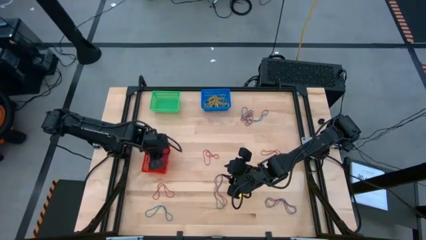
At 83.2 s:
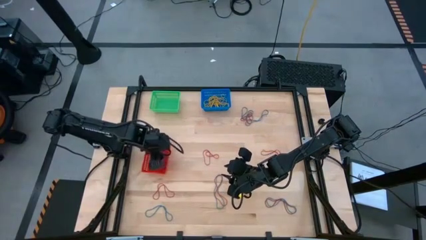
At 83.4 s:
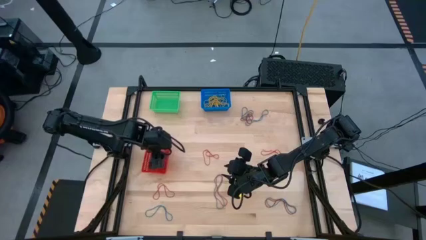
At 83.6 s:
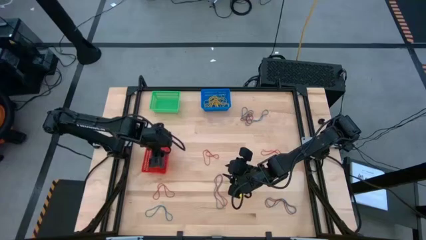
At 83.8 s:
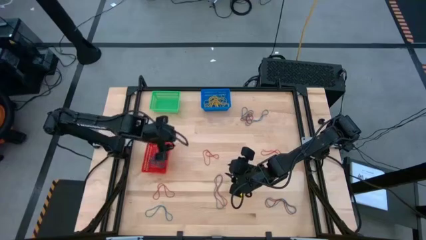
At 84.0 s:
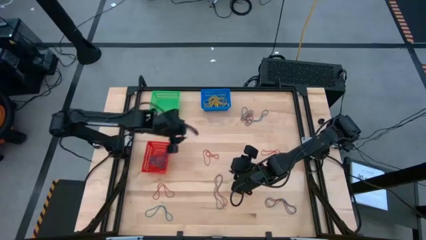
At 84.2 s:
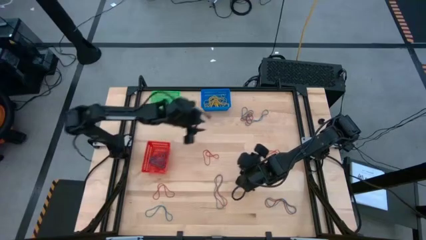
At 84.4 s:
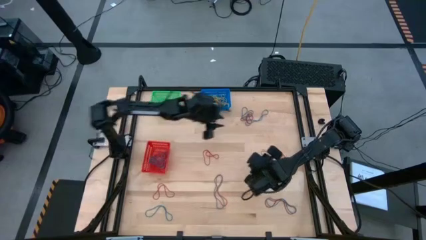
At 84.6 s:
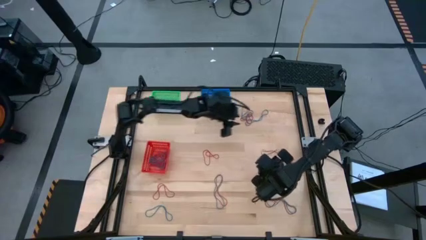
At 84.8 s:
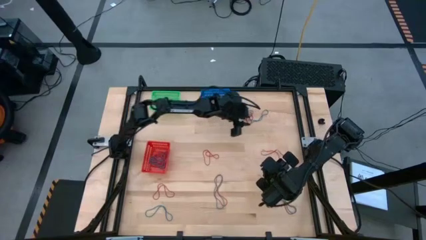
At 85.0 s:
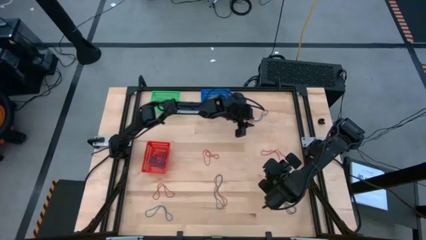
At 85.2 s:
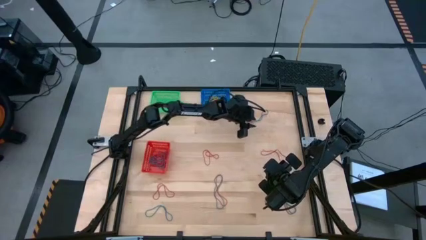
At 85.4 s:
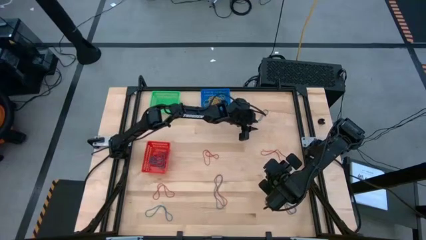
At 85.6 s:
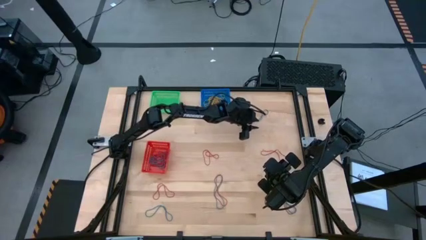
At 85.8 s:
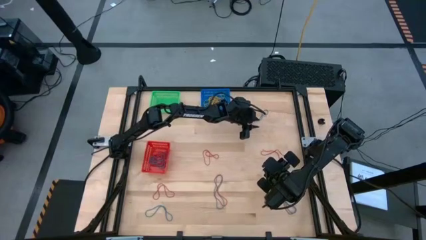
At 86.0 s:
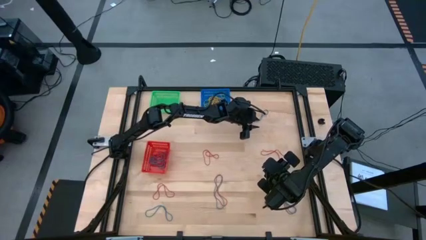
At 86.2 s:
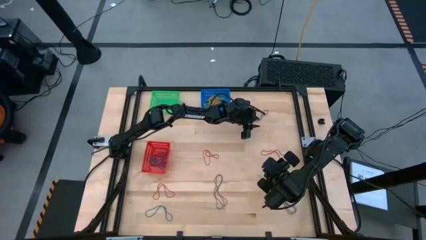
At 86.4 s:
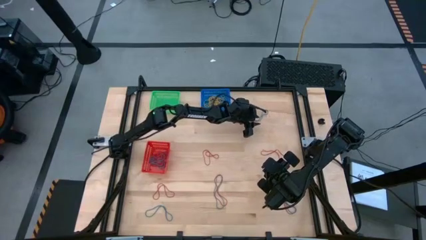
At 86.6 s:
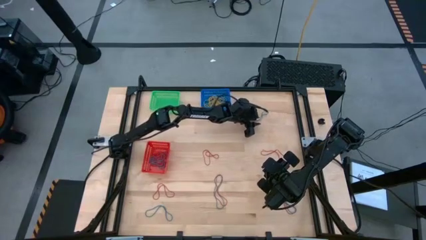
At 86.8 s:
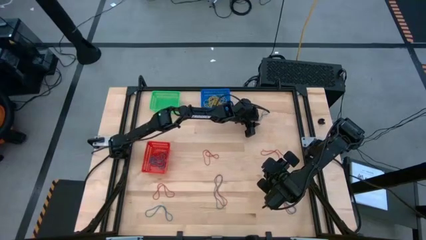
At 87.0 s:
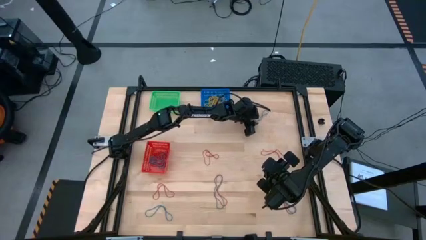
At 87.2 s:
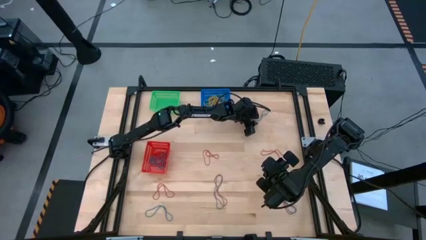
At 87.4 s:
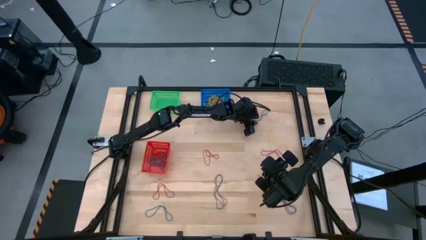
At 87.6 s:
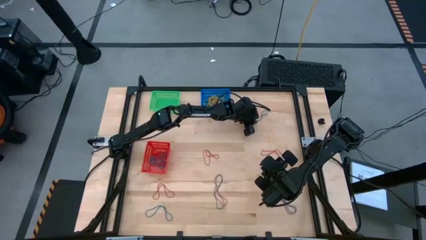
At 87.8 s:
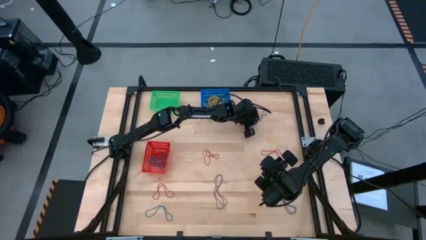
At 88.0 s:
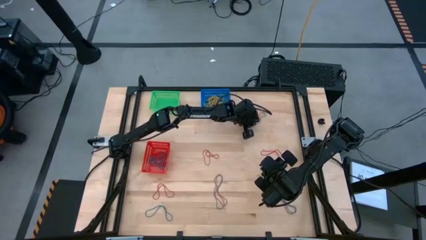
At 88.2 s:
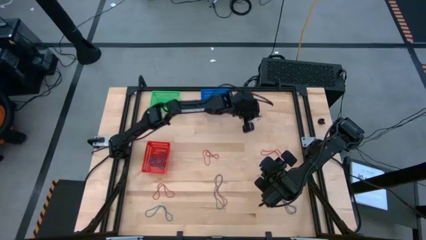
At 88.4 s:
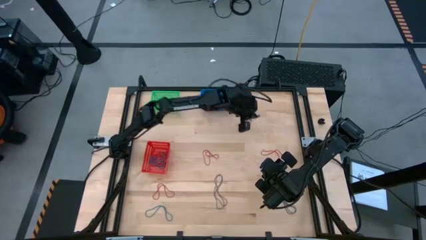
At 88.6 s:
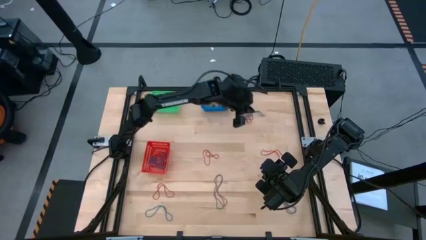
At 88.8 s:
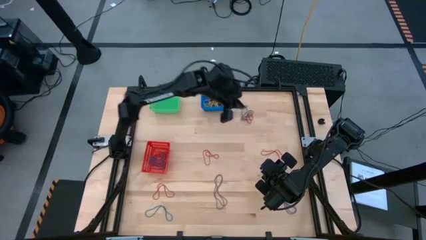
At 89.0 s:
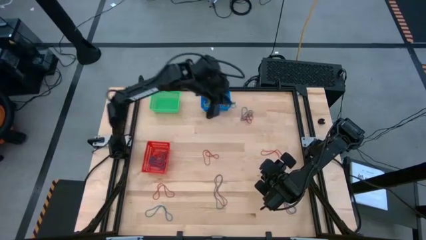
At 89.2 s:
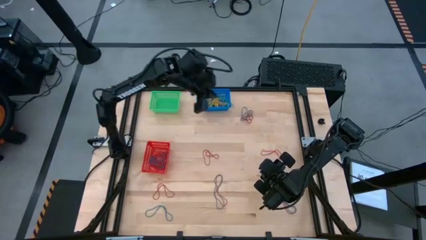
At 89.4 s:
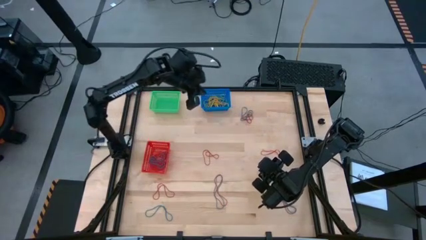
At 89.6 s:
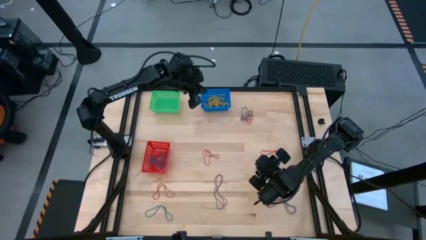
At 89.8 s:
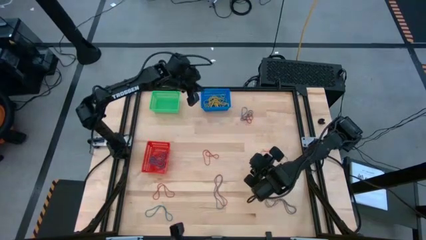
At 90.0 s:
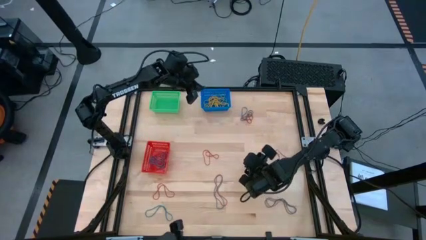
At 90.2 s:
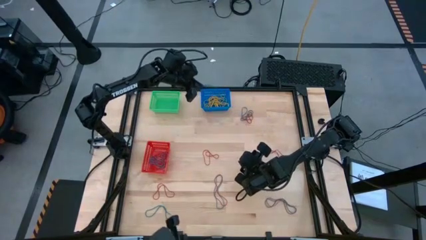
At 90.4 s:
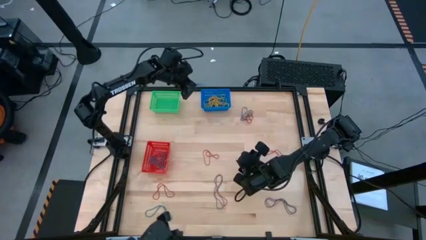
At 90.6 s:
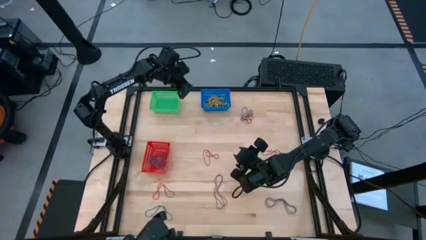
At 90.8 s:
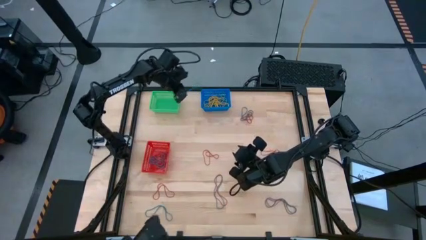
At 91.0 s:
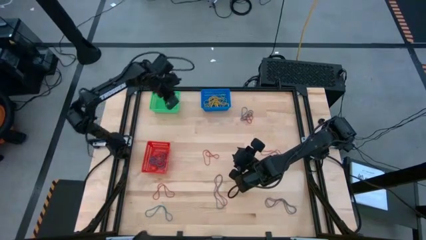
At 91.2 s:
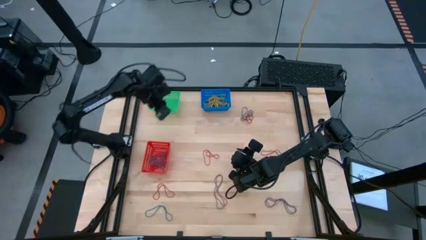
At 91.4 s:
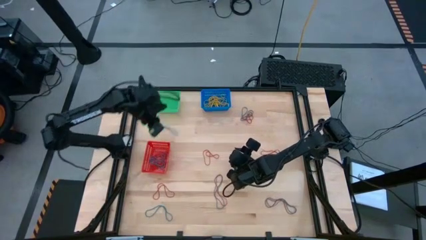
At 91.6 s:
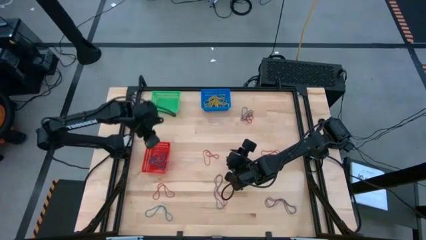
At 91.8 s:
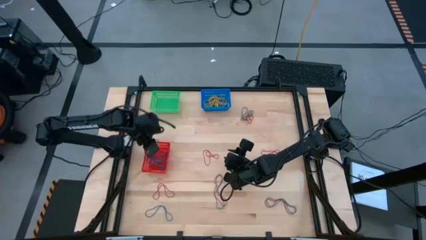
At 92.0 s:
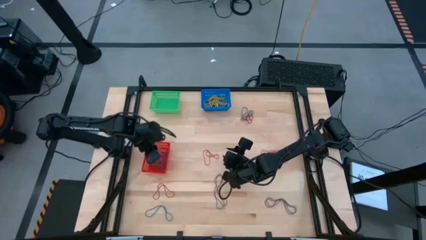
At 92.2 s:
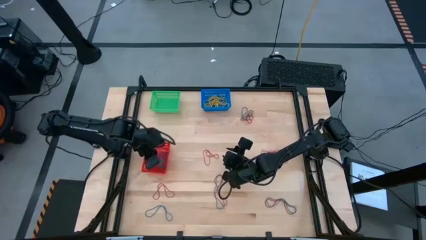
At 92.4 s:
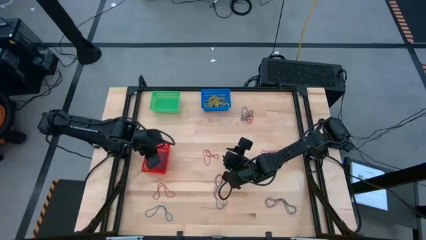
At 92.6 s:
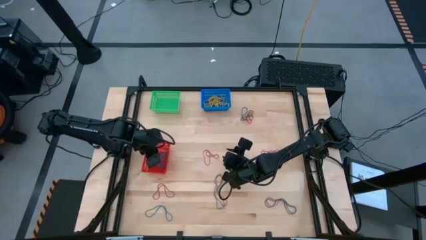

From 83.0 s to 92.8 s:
Task: Sort rubber bands into baskets
Put the blue rubber band into the red bin

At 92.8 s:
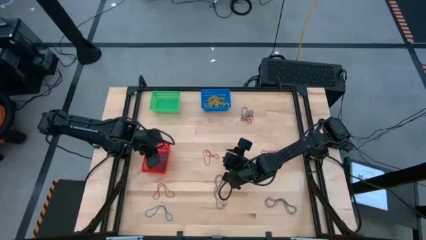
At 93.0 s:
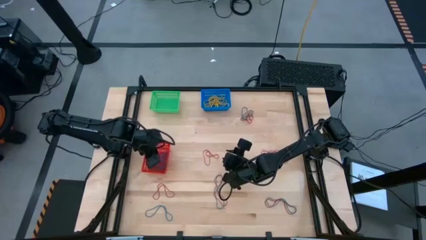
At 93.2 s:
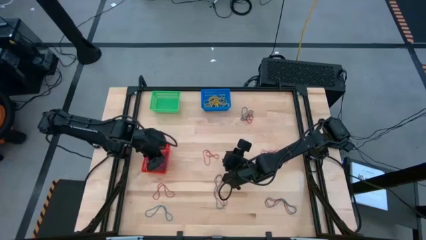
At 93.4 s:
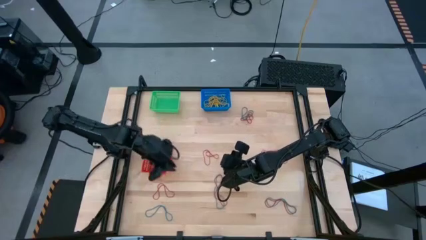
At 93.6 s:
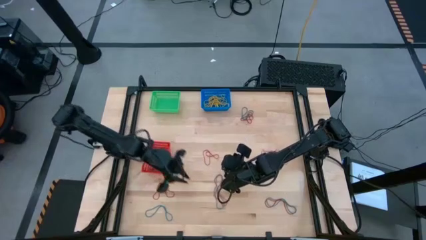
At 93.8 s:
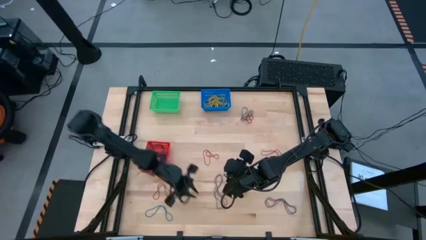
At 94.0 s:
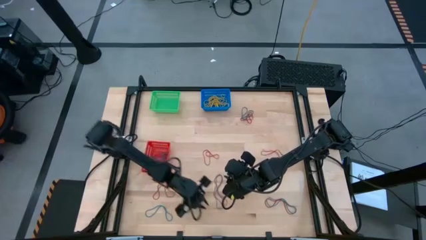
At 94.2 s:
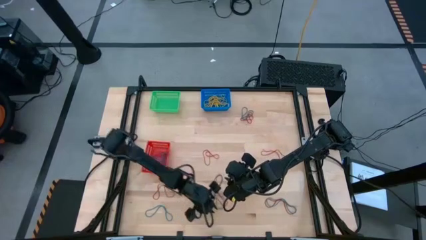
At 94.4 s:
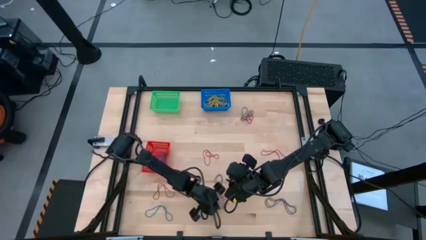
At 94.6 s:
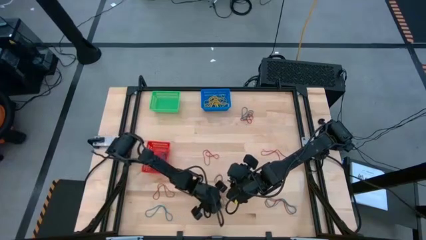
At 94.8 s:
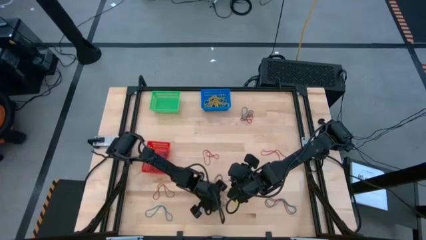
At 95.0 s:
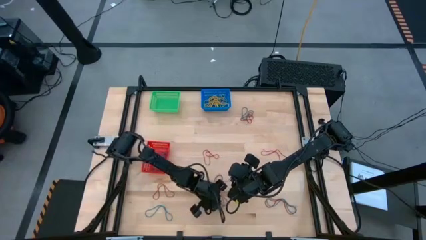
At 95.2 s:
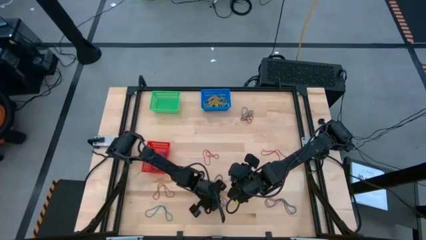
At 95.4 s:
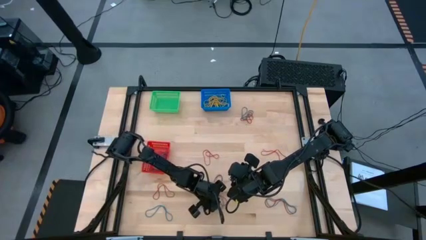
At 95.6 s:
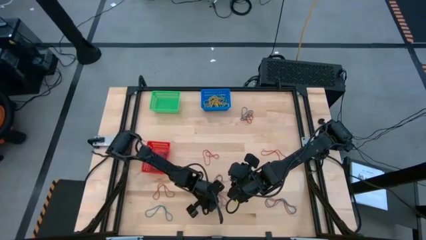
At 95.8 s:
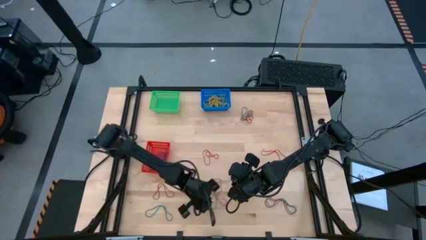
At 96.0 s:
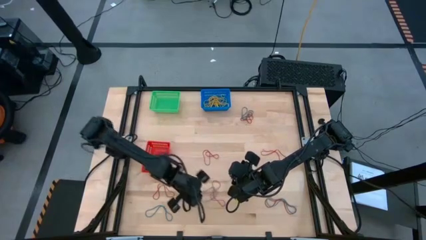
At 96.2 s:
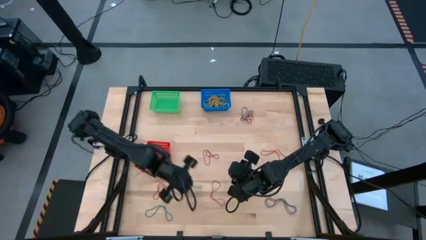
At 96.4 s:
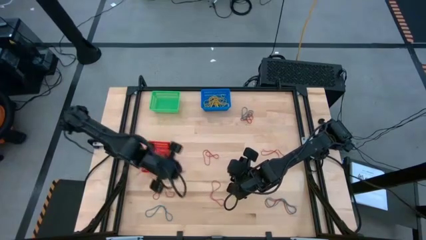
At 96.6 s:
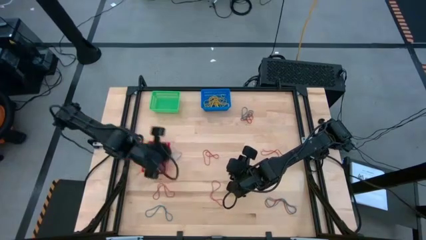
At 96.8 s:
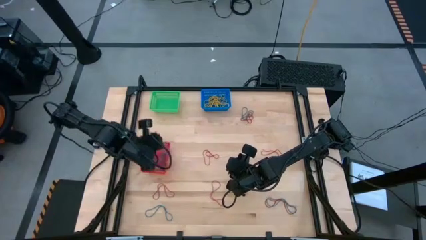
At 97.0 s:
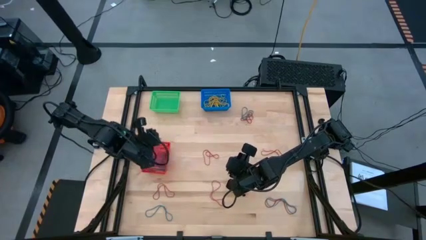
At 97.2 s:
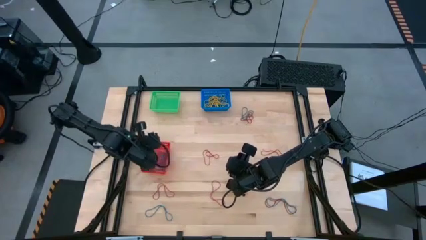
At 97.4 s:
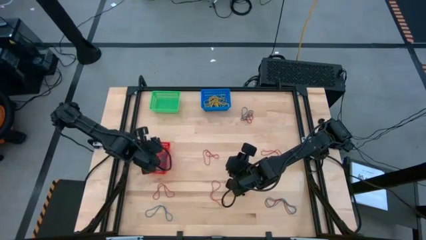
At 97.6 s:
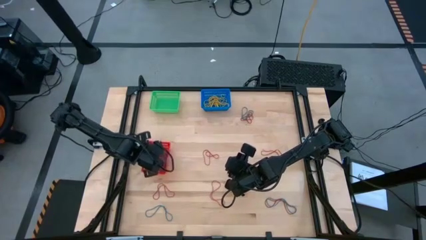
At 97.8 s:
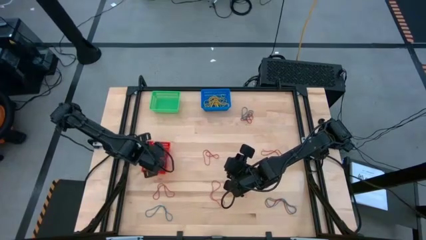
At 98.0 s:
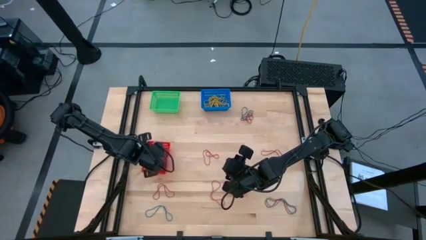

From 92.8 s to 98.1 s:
Put the blue rubber band into the red bin

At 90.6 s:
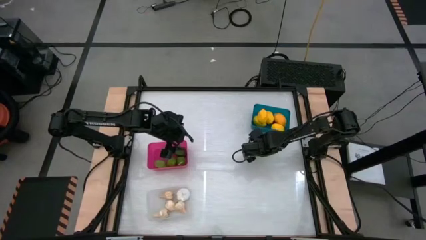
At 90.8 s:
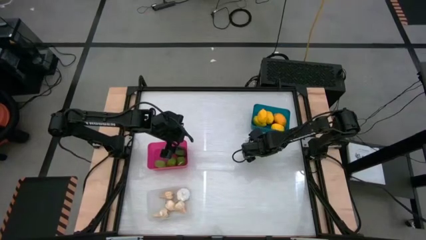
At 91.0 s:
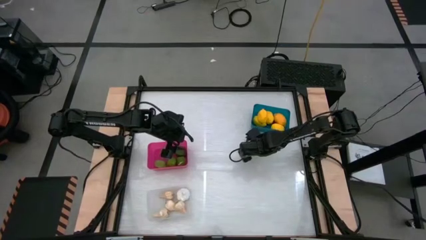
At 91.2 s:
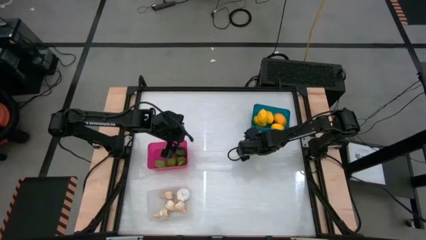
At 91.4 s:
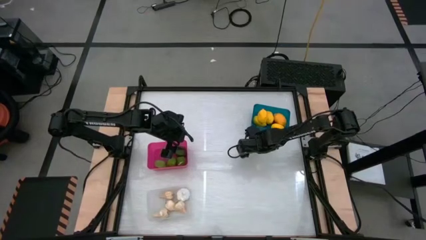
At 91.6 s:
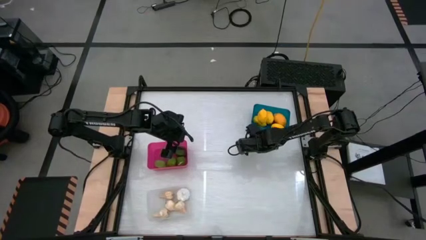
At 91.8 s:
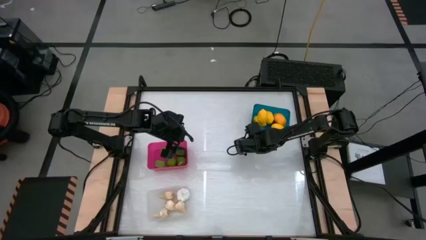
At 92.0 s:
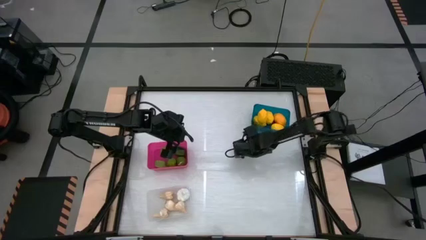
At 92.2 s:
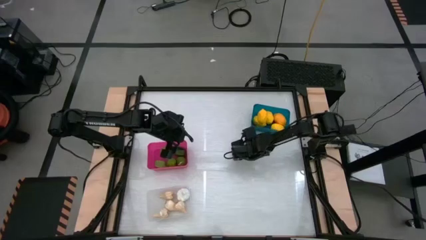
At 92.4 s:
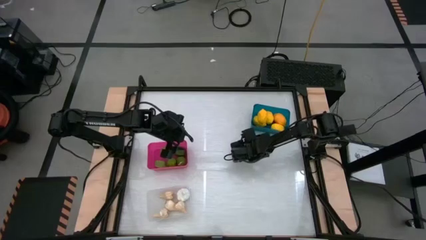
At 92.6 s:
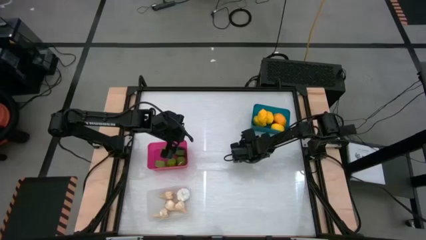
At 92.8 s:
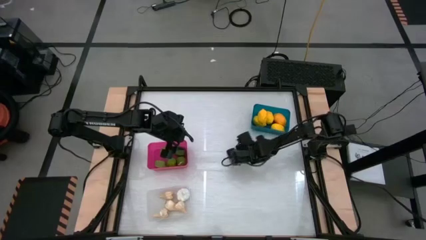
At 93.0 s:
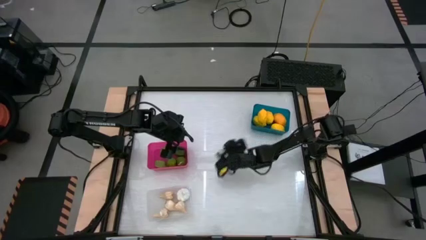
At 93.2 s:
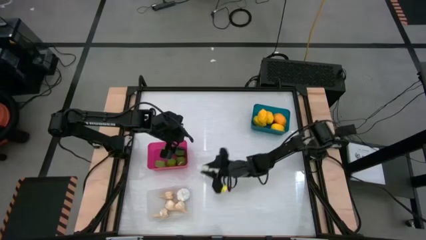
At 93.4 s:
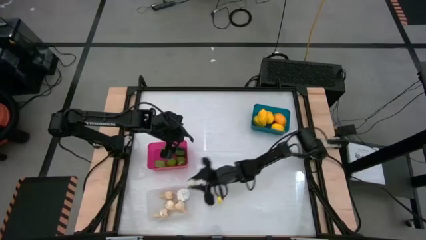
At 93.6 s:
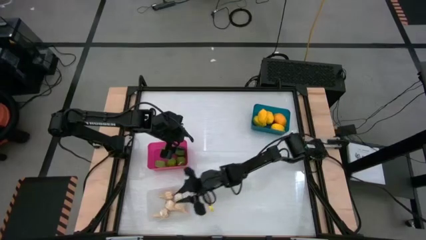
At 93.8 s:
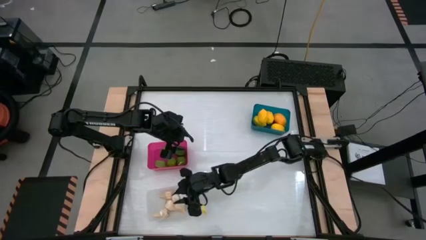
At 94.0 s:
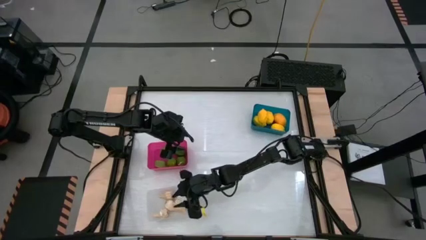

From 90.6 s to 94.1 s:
Task: Sort produce into baskets
Put the garlic into the white bin
